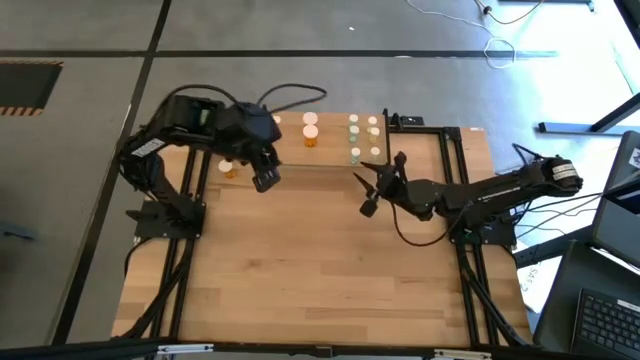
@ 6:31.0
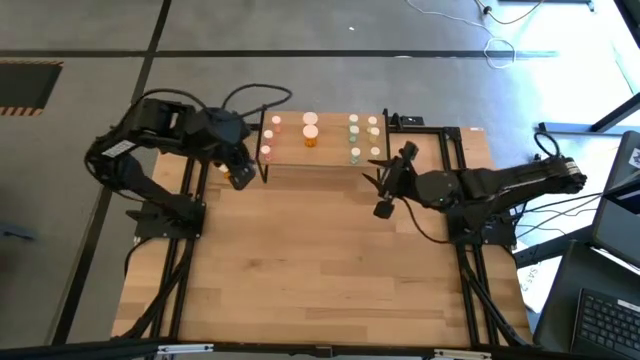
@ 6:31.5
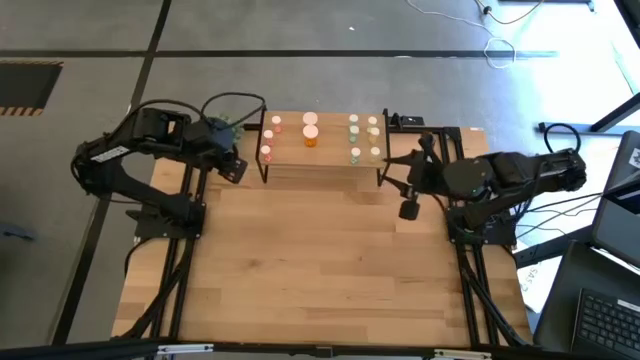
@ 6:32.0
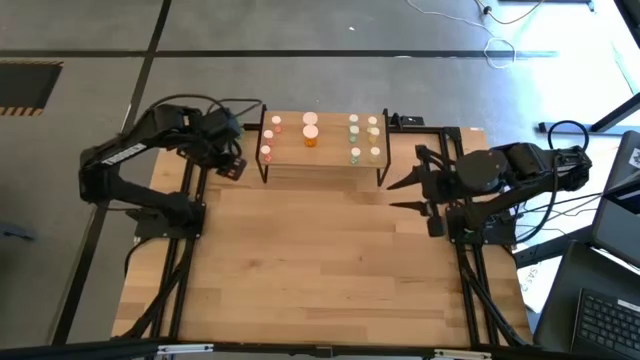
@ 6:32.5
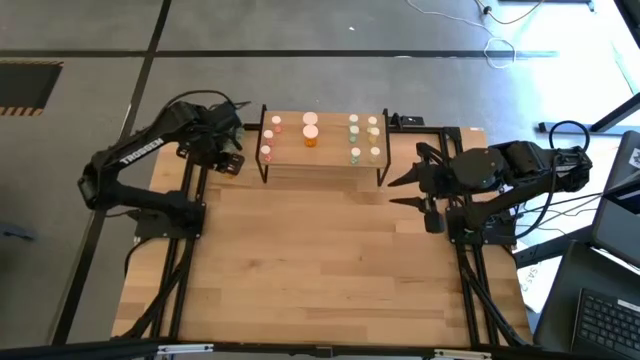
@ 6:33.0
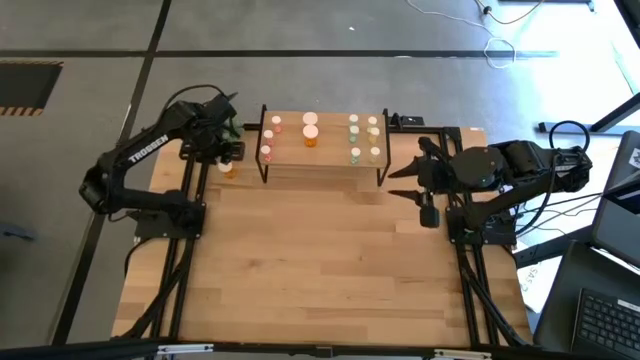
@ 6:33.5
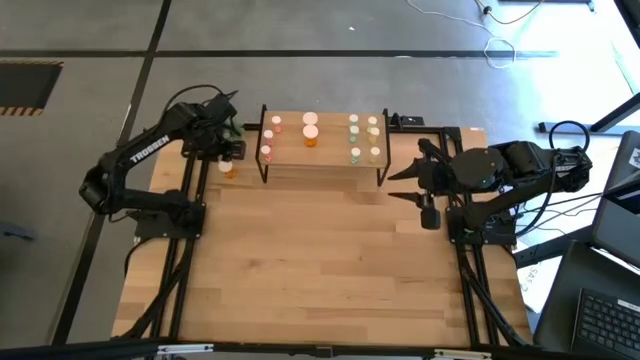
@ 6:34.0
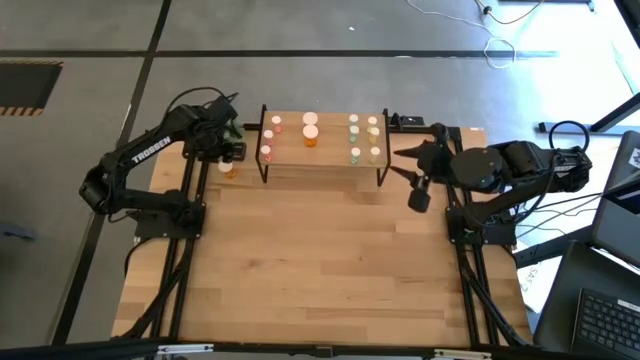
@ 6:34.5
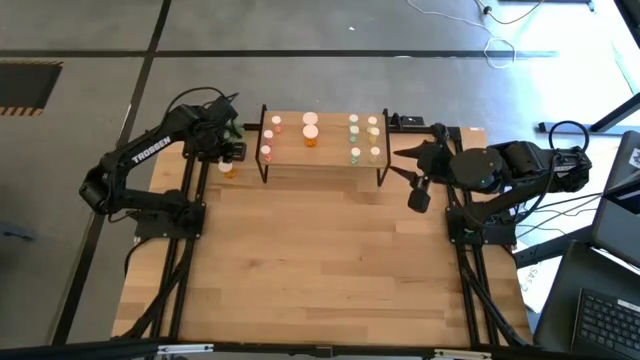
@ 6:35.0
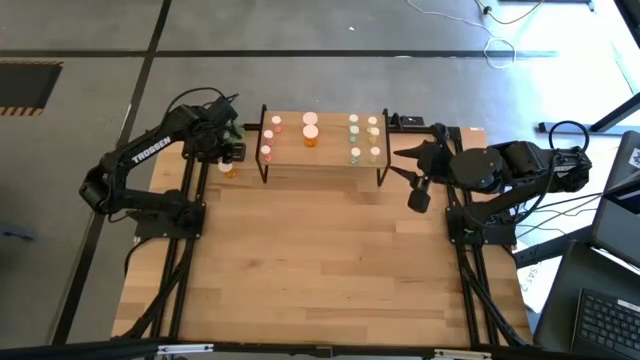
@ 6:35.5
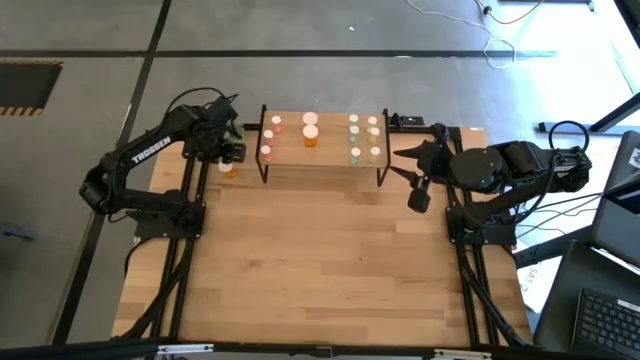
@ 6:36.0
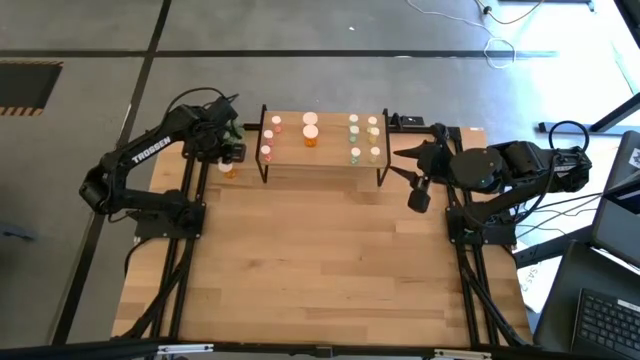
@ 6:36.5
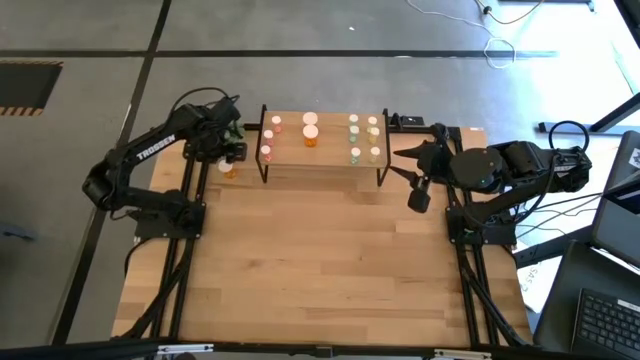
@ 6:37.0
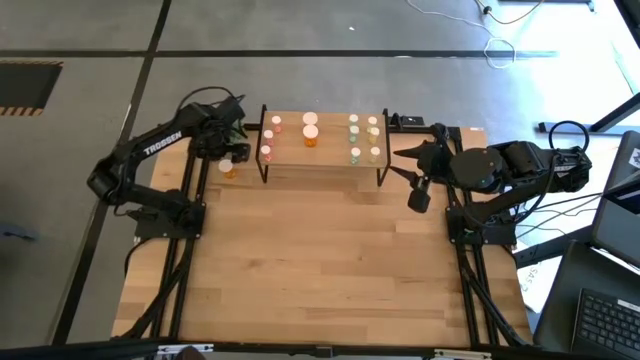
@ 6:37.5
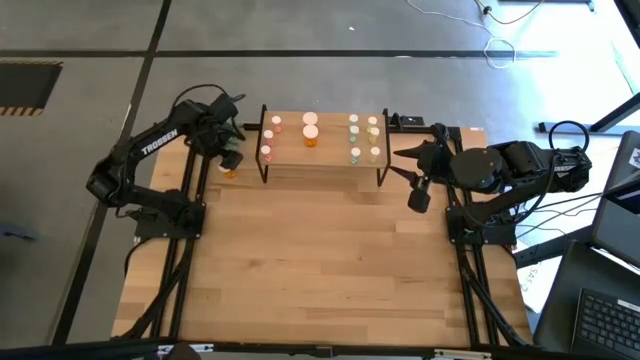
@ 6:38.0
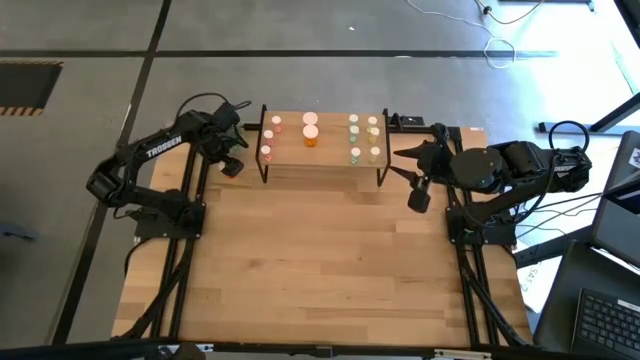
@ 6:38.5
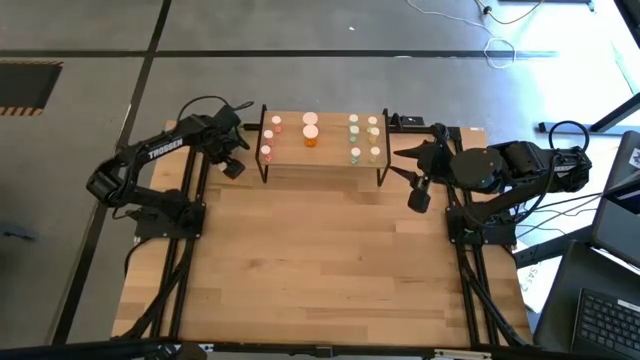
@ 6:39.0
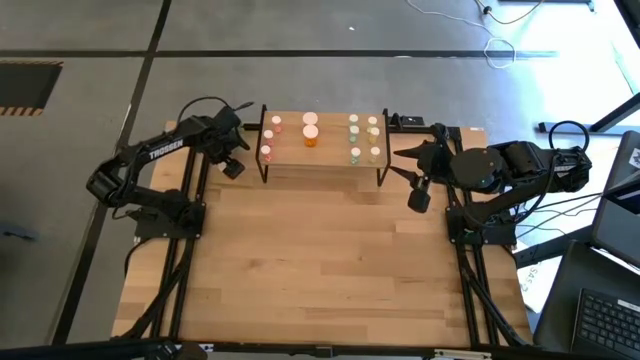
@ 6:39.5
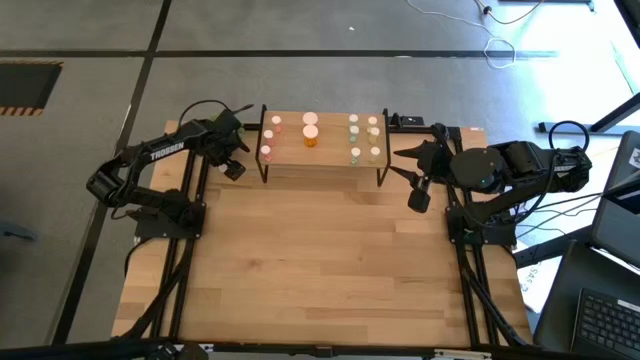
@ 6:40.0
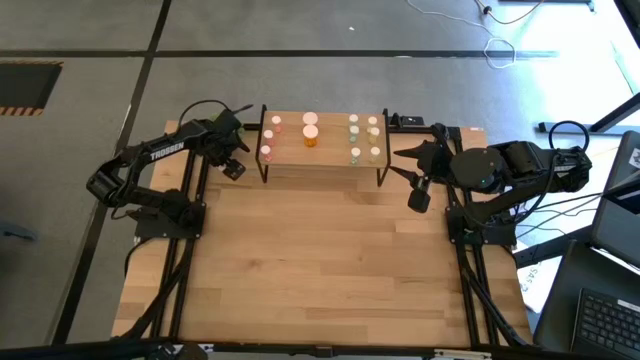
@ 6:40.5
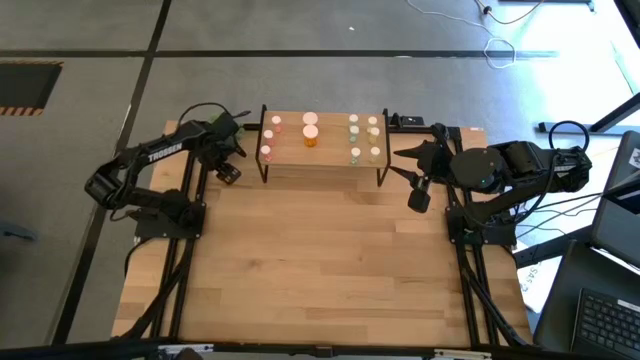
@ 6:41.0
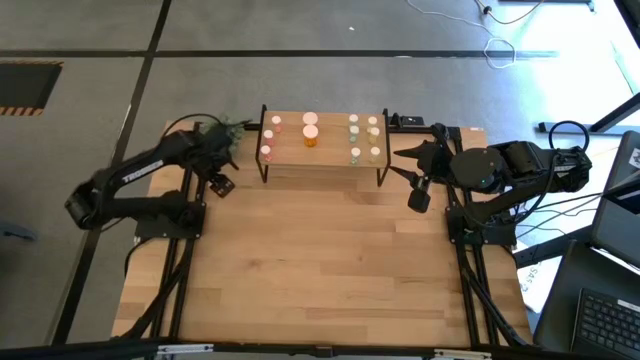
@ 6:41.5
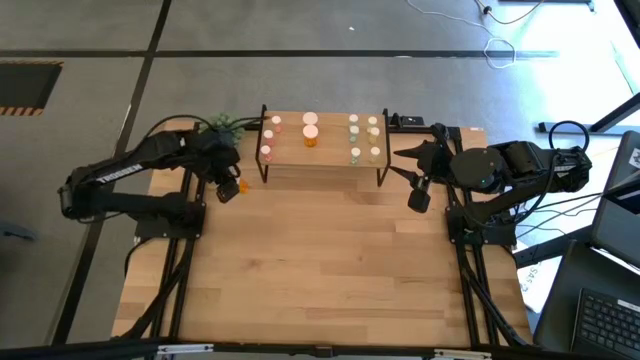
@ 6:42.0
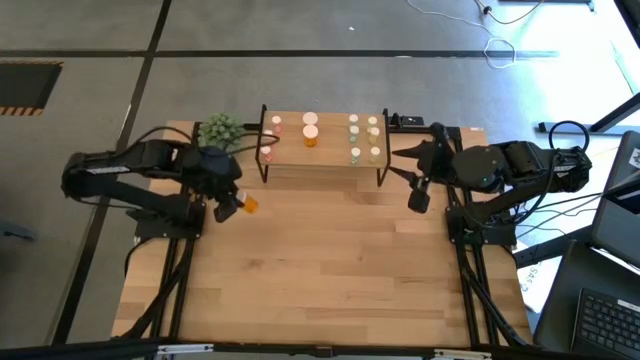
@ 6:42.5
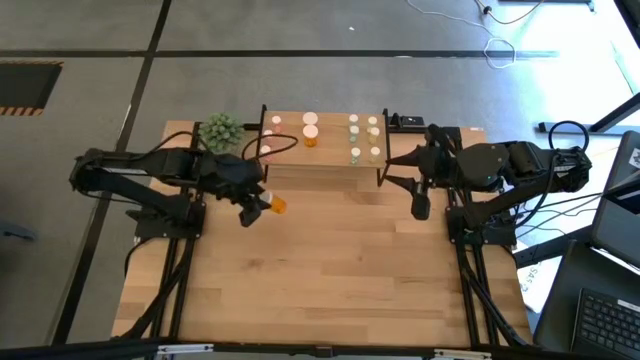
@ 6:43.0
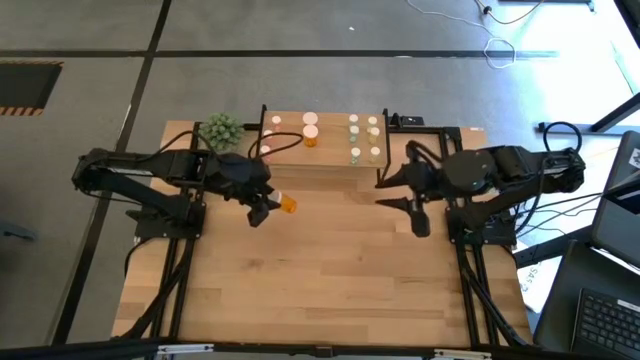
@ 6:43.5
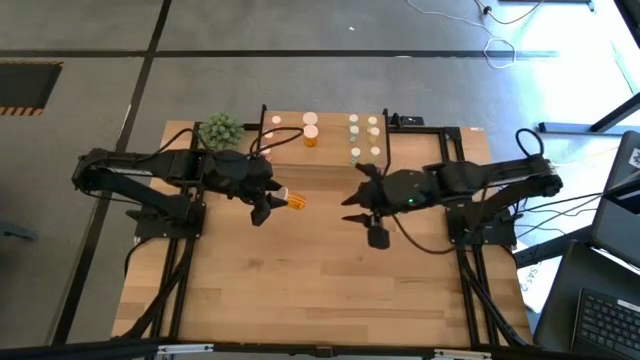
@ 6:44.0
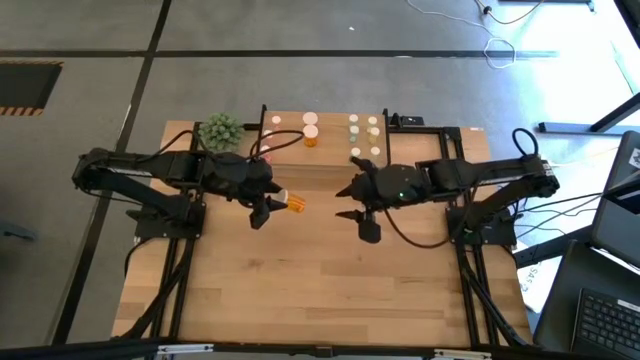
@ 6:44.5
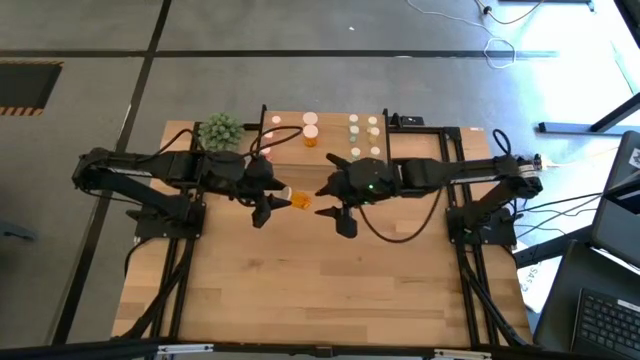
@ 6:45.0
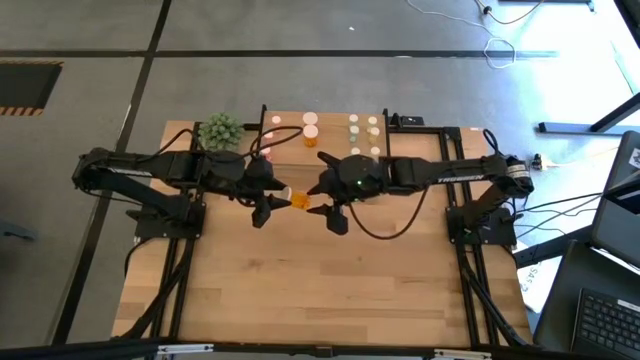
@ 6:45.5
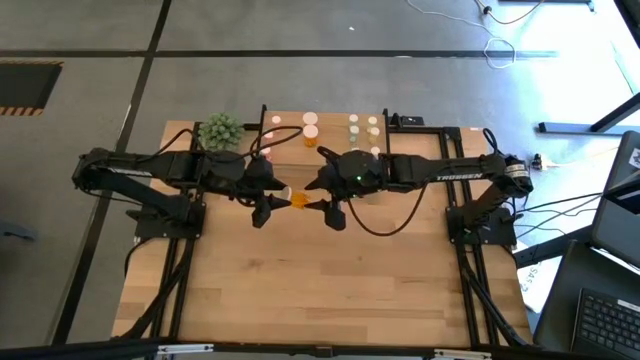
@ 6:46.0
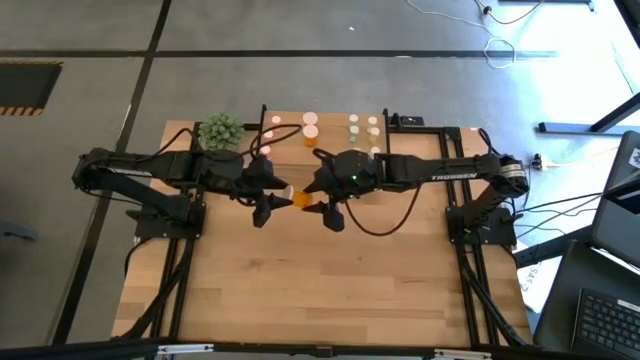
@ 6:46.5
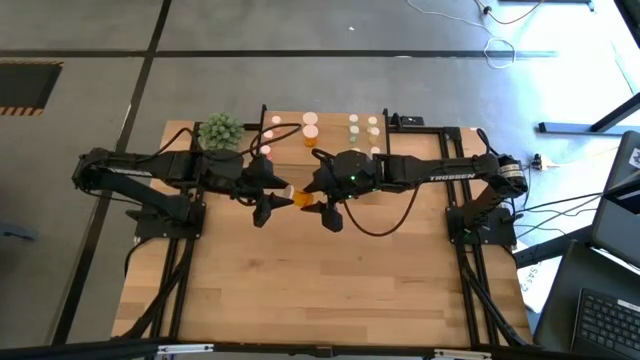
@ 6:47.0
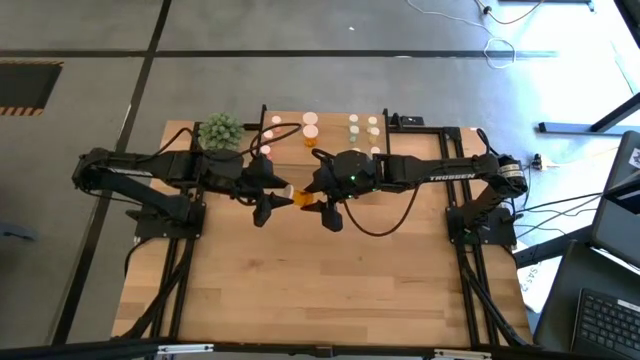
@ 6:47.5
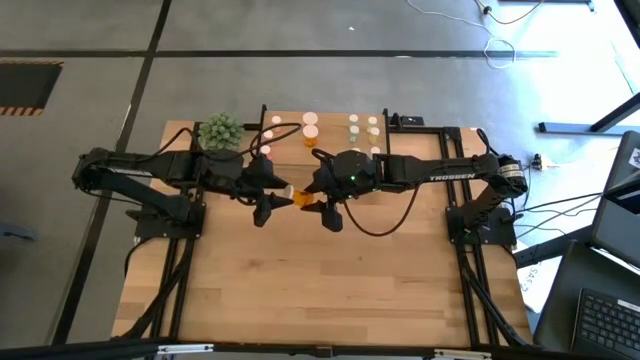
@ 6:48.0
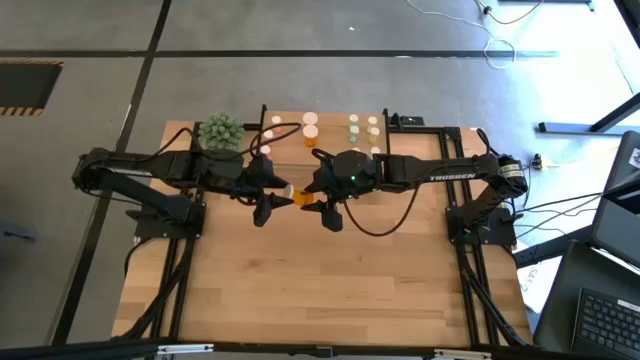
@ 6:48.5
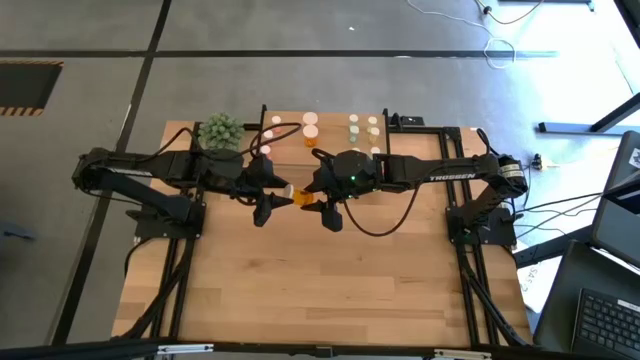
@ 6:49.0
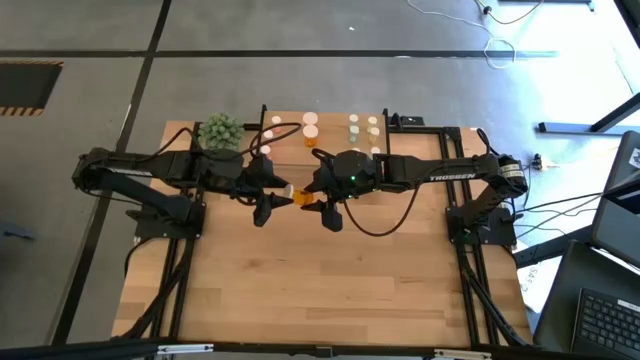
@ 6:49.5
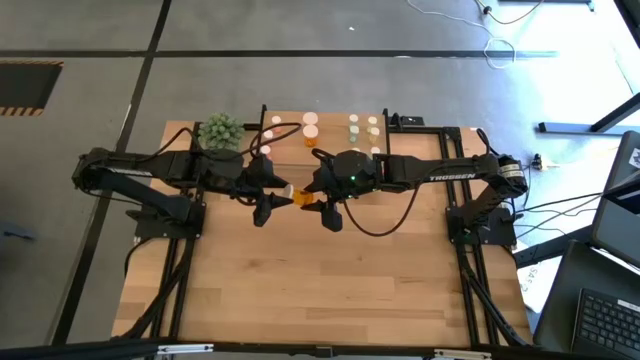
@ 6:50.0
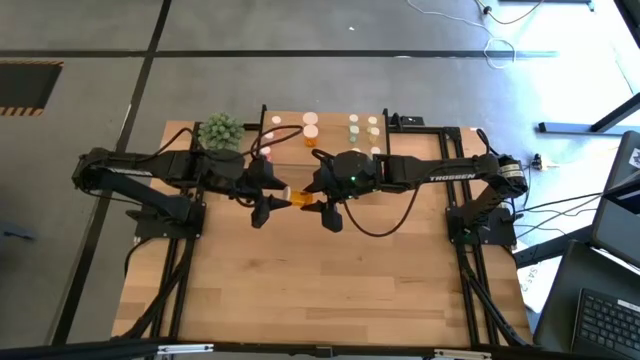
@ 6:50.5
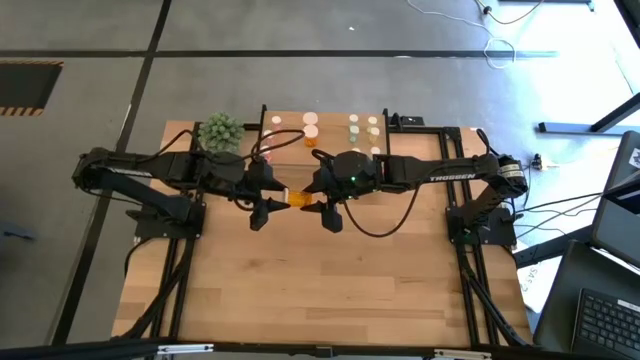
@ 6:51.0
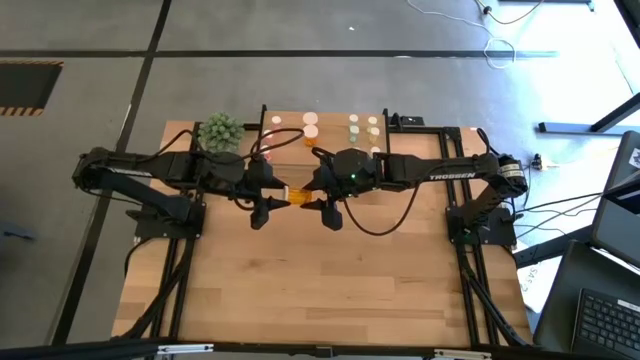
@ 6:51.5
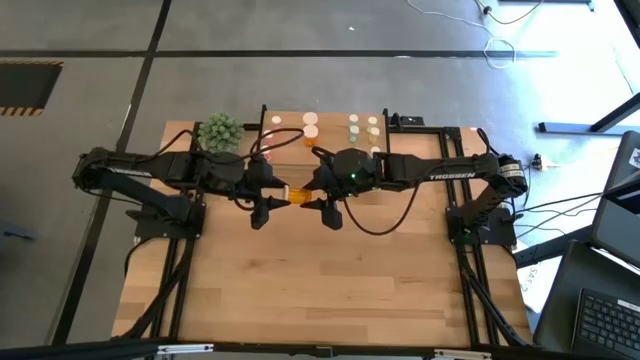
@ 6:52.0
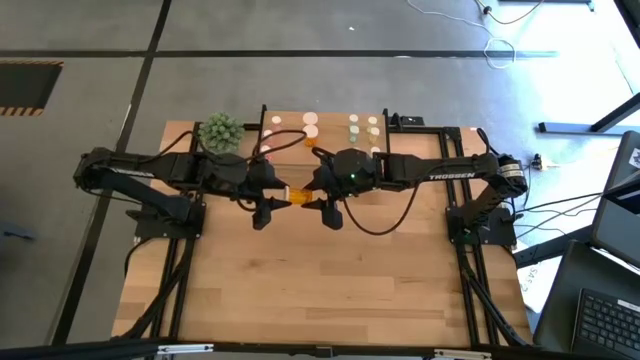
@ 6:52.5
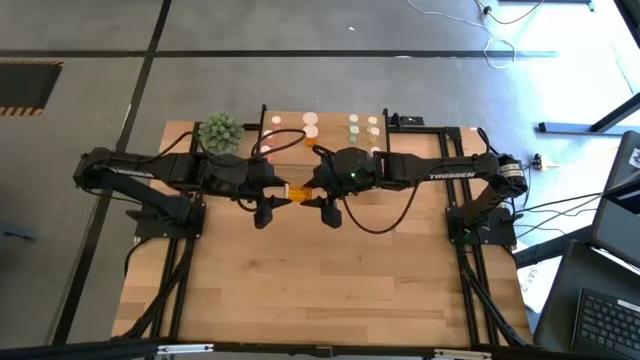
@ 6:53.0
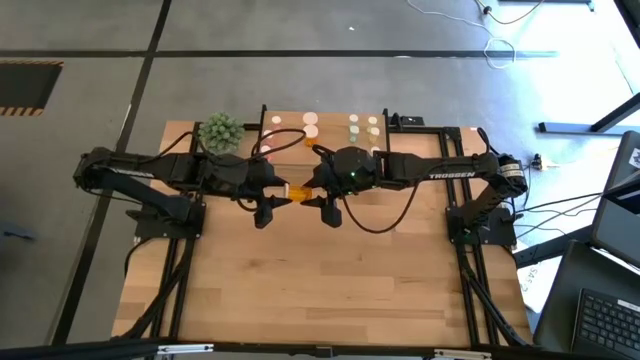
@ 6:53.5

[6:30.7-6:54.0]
Task: Pick and place medicine bottles onto shelf by color
Put the orange medicine bottle on the shelf, aligned with the other orange medicine bottle
